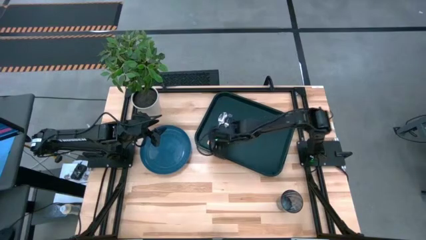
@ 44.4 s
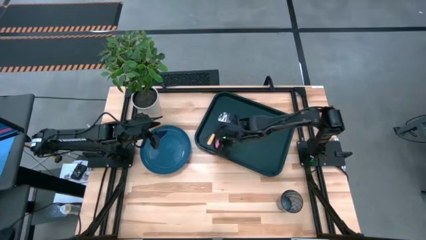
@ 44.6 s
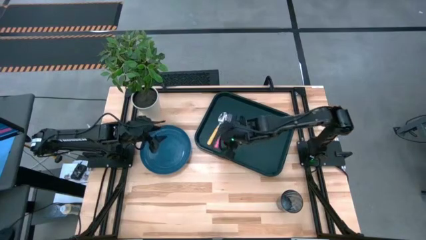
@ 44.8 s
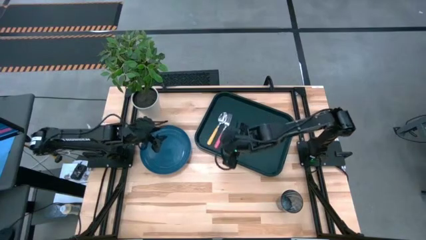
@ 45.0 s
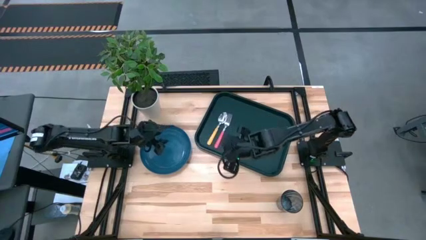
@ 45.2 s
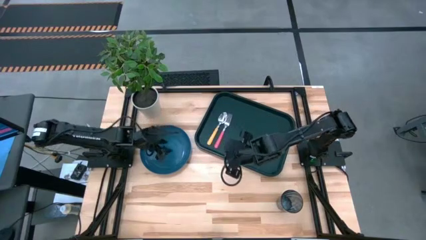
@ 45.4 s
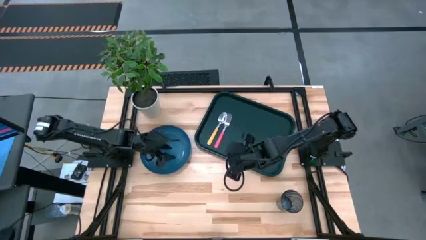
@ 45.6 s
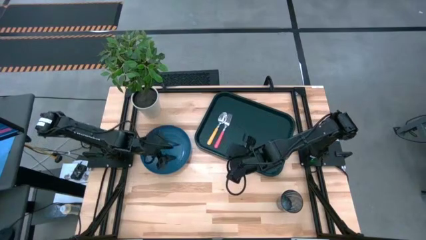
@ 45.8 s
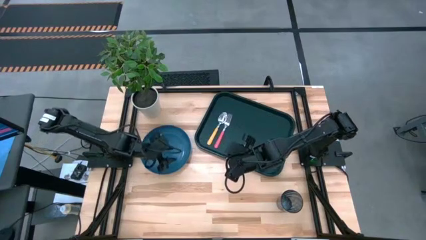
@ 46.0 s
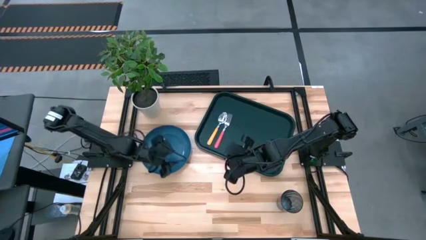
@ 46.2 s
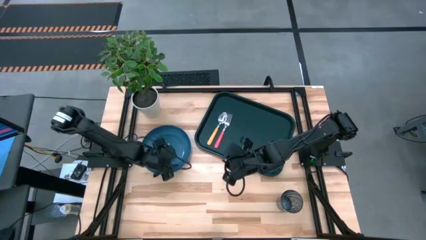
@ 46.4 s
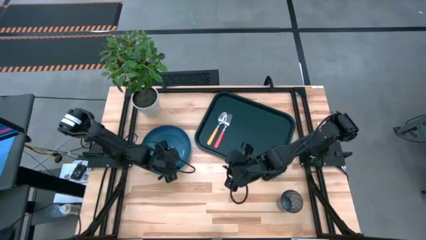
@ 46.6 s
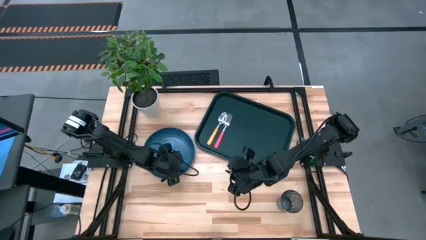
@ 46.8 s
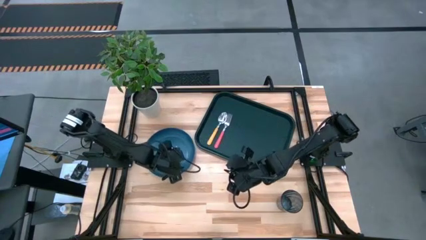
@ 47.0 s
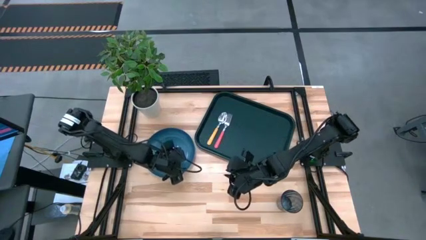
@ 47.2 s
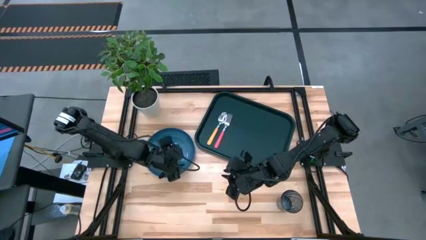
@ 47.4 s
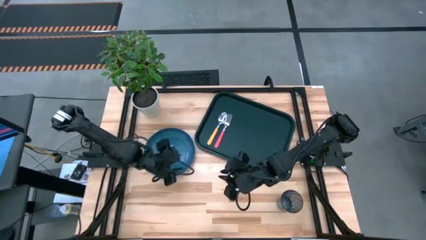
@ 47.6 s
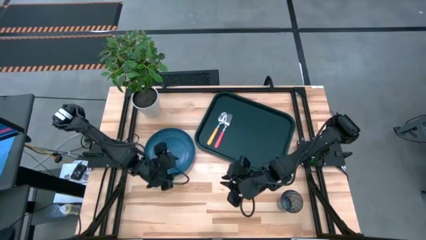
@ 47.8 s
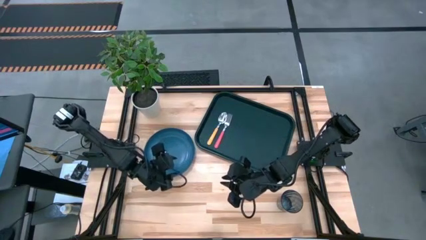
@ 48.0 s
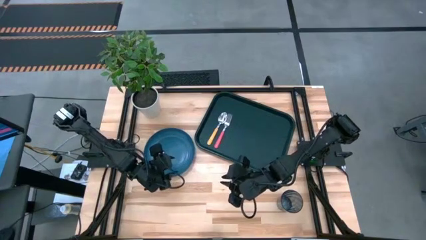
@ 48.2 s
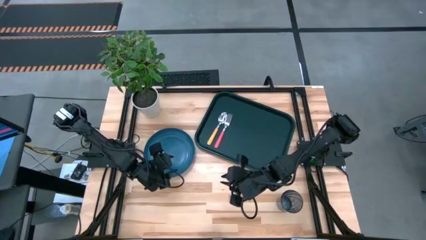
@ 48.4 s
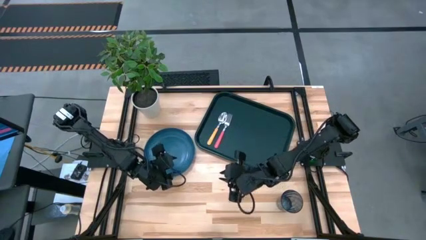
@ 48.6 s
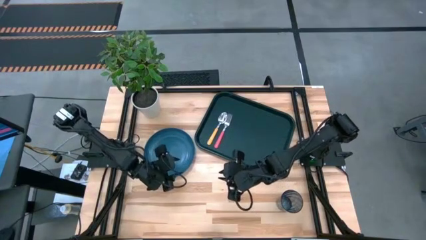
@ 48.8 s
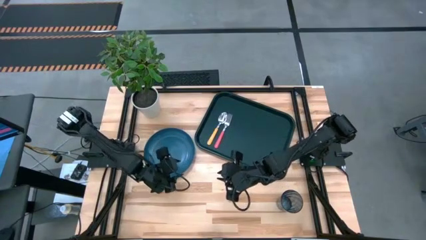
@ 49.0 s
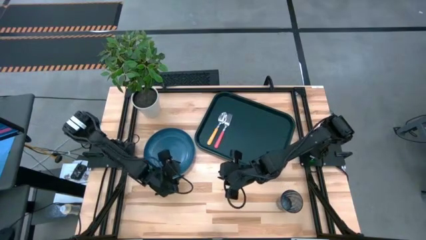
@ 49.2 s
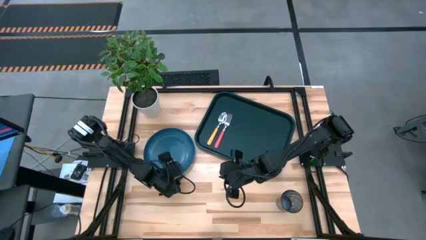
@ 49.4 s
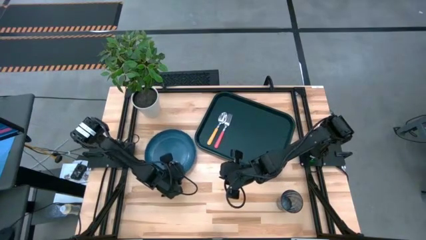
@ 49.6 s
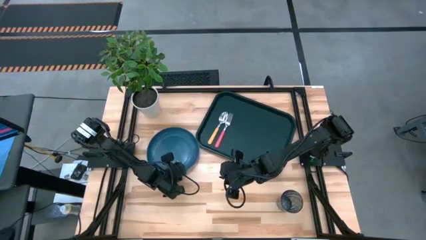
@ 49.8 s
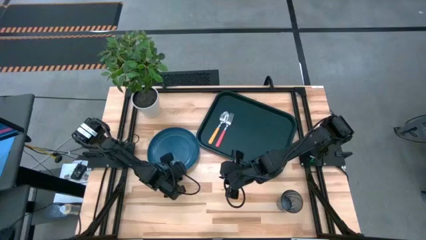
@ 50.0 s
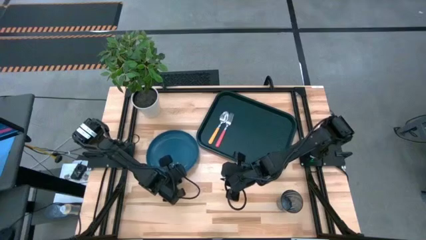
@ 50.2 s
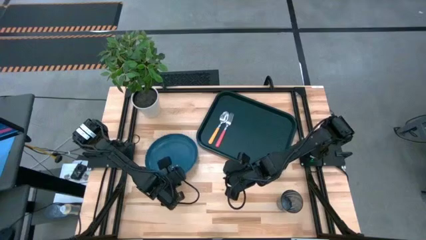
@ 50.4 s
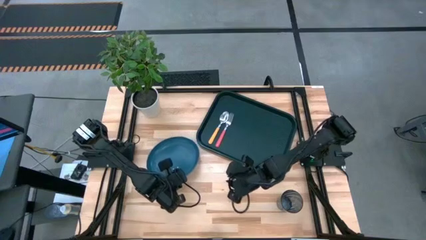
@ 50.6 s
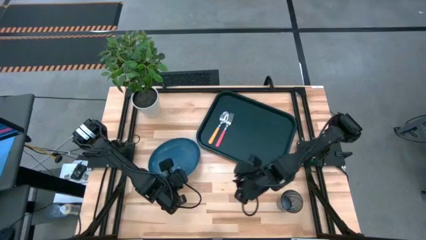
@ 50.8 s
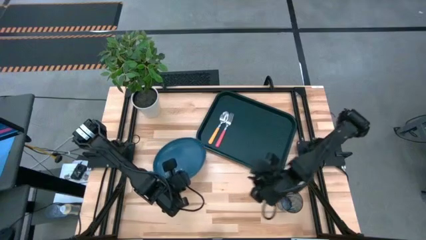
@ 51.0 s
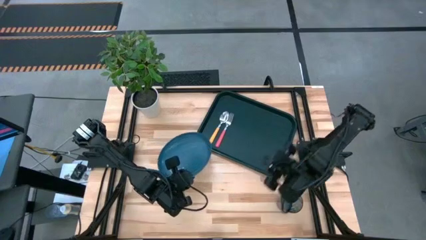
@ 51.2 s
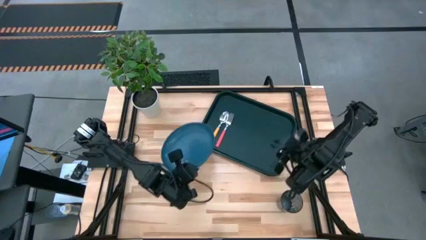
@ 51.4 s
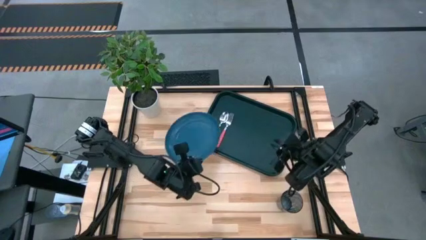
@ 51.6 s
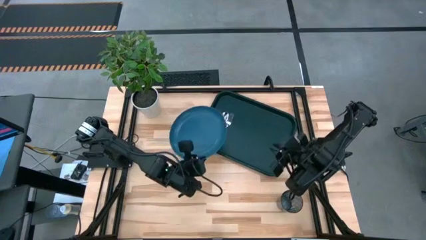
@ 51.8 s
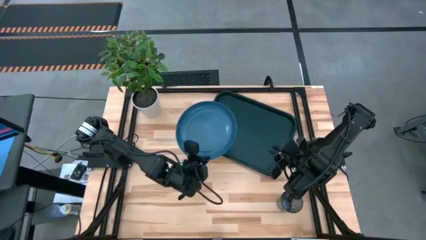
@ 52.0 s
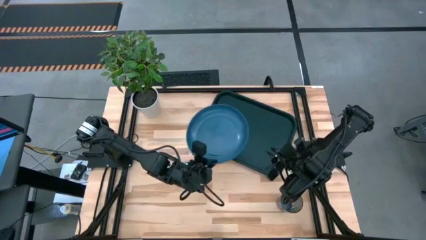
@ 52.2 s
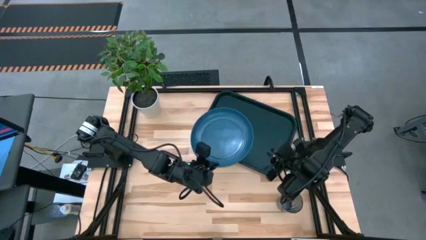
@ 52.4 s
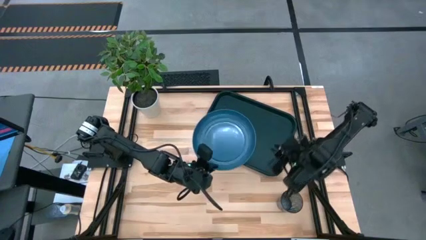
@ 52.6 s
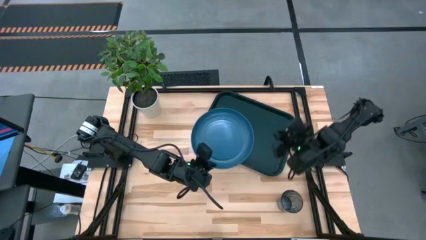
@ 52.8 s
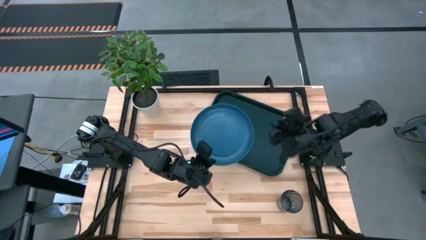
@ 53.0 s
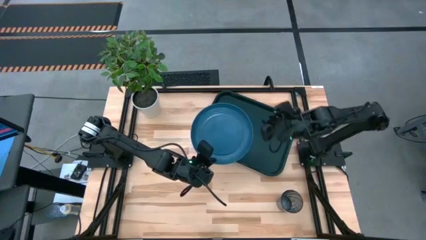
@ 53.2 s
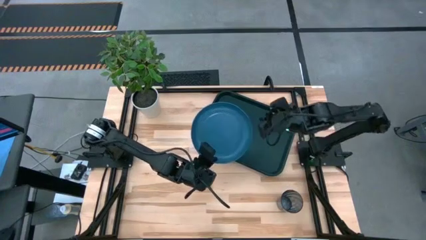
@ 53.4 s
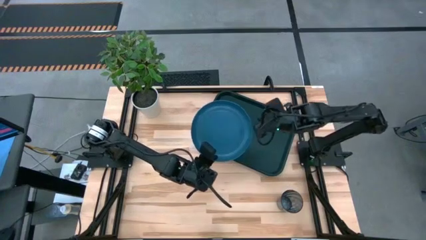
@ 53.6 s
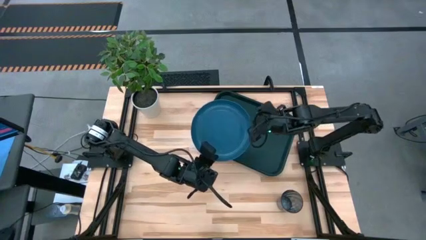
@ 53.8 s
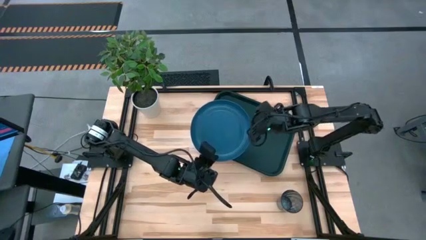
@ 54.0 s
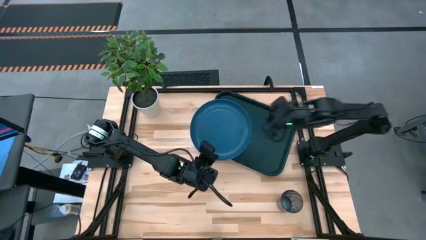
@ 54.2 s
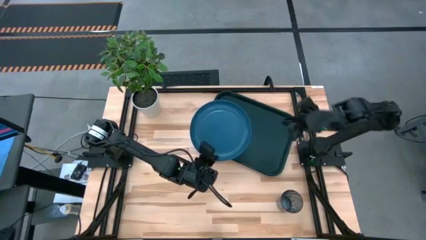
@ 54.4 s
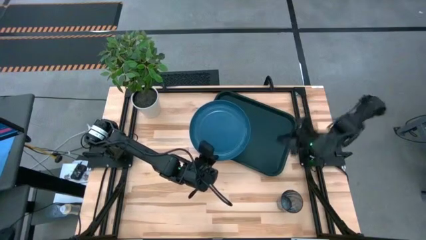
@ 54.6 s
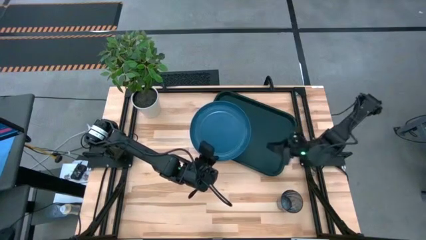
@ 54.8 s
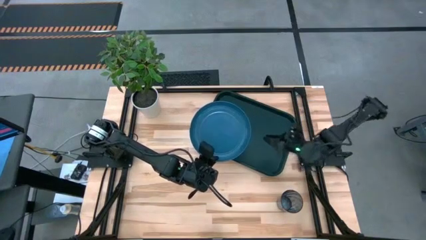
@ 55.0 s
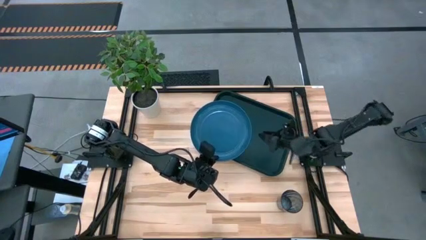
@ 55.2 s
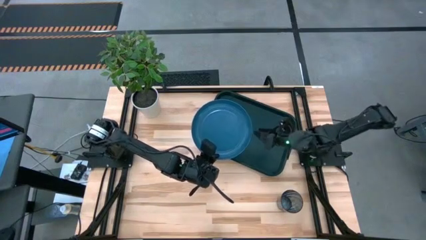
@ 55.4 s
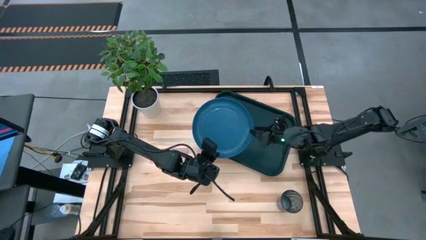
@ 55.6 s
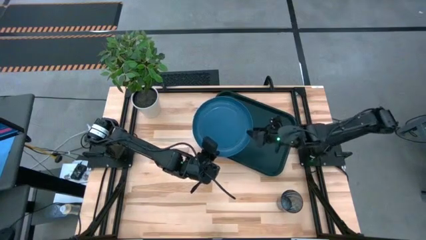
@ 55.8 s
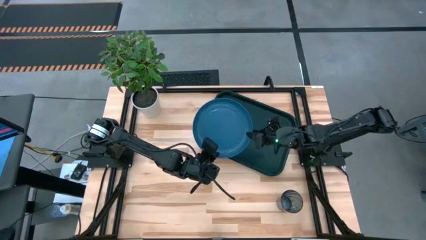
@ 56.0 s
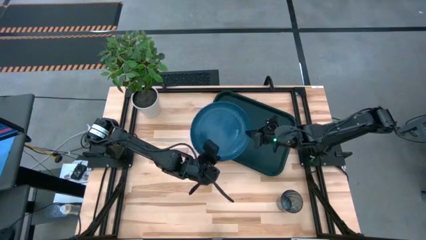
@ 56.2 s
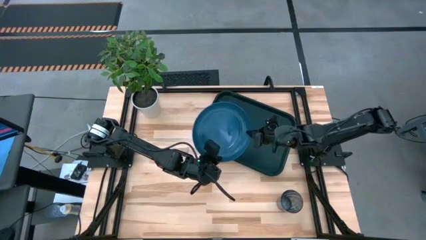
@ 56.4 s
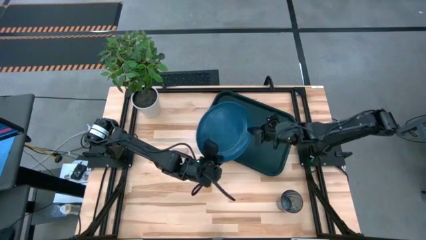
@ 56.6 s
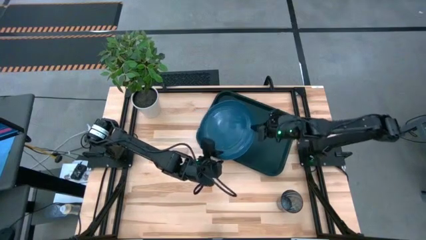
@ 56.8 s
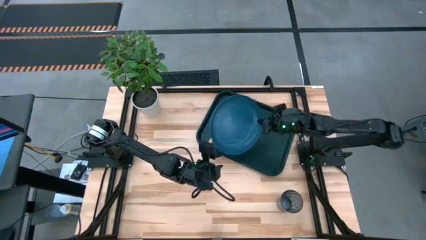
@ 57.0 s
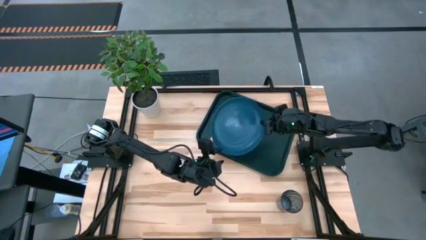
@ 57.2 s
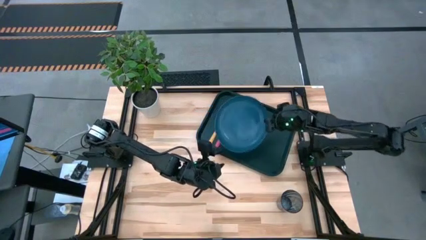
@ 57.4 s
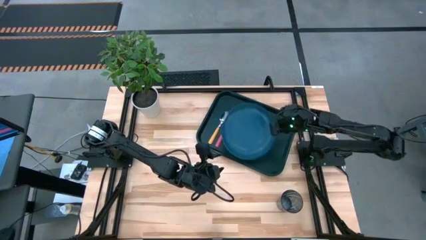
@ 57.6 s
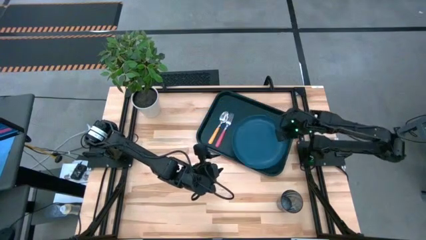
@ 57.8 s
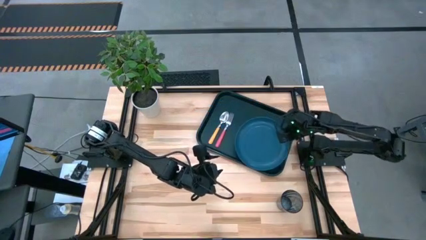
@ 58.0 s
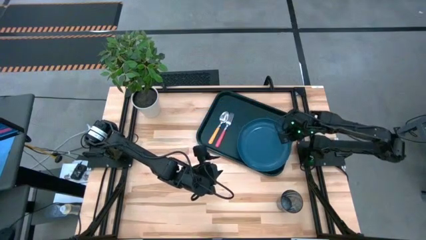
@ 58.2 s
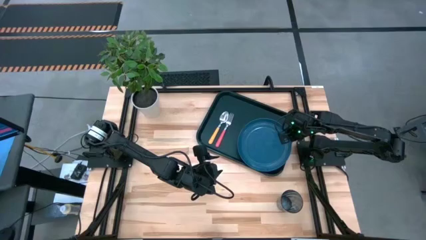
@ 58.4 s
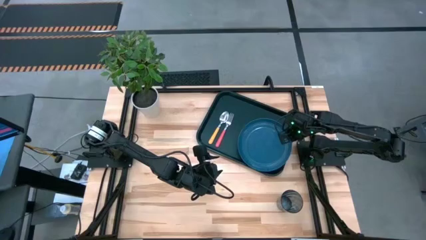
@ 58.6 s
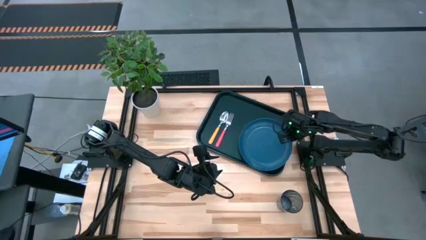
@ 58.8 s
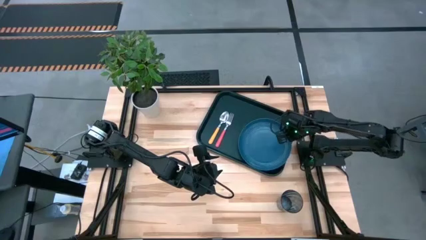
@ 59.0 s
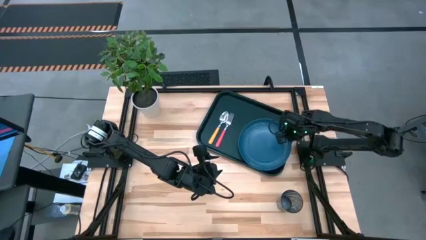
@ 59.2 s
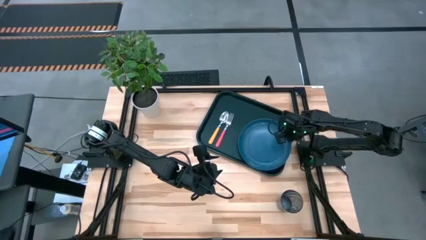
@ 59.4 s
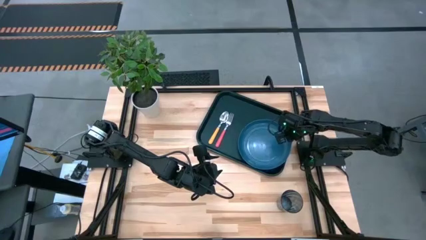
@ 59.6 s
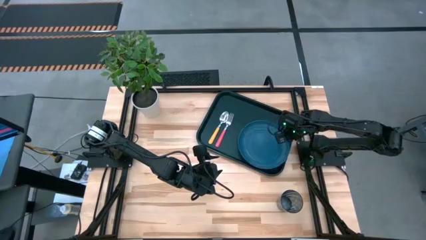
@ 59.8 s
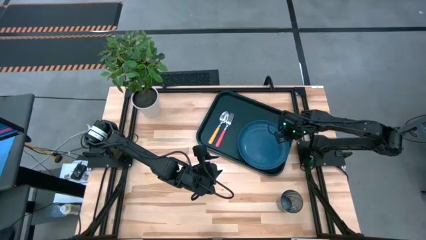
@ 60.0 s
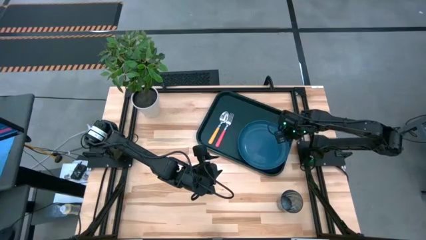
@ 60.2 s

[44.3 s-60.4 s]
Task: Pick and place plate/cup/fork/spoon on tray
Put the blue plate on the black tray to the right of the pink fork

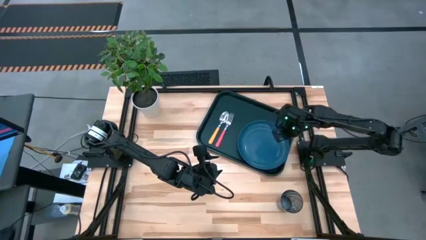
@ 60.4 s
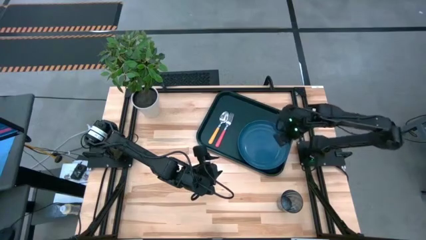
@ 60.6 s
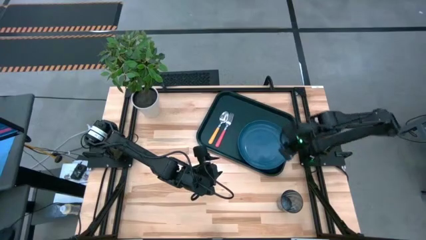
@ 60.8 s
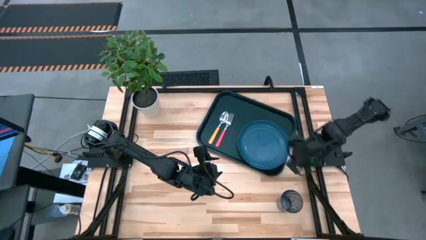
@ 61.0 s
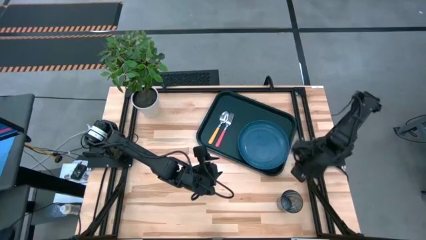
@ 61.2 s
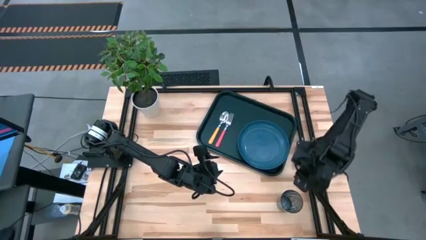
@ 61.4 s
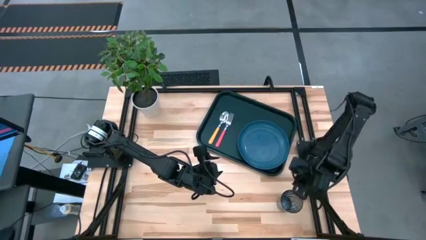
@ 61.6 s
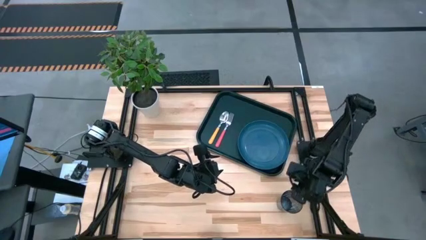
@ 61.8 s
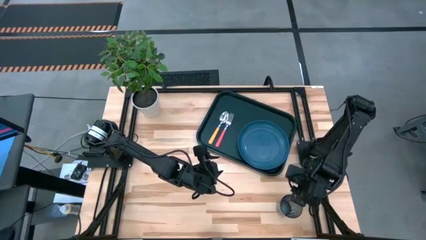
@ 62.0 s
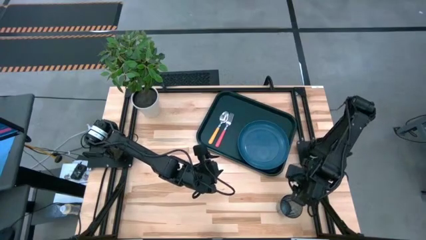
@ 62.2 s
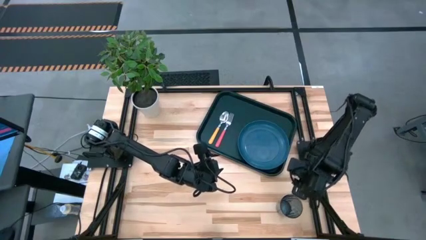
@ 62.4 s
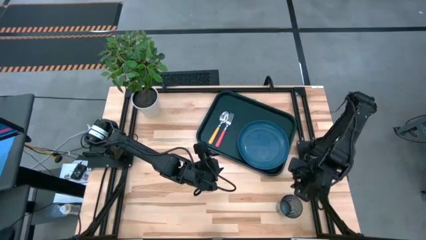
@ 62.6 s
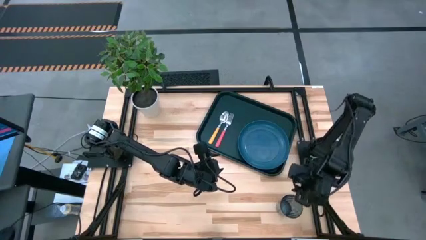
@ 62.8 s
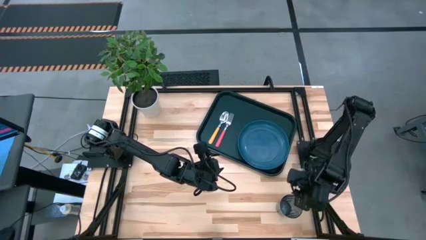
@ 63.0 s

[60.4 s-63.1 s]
Put the blue cup on the black tray above the blue plate
